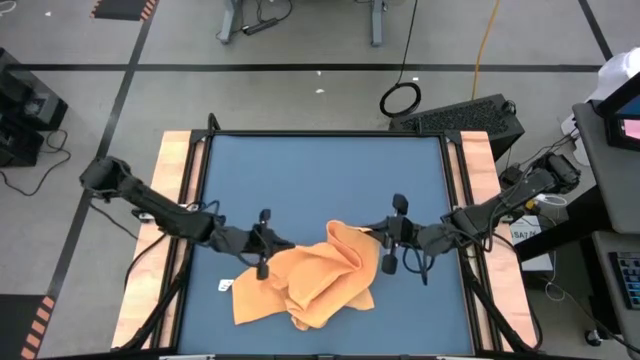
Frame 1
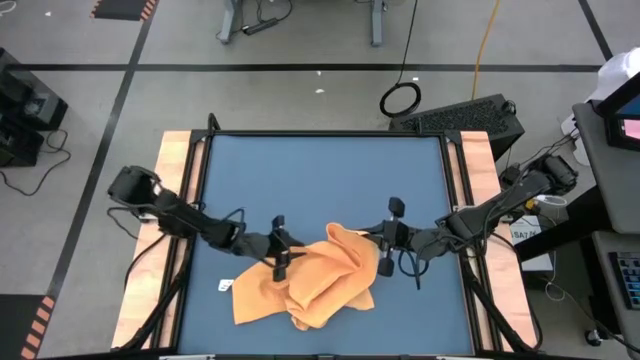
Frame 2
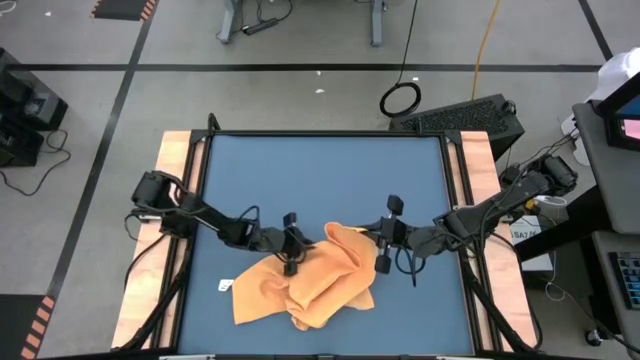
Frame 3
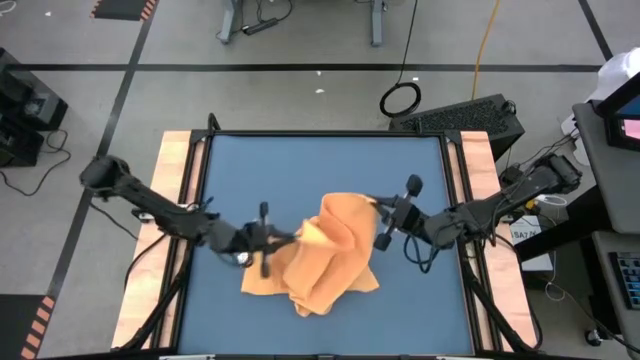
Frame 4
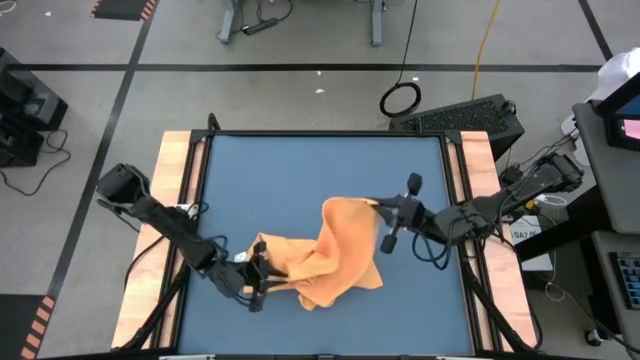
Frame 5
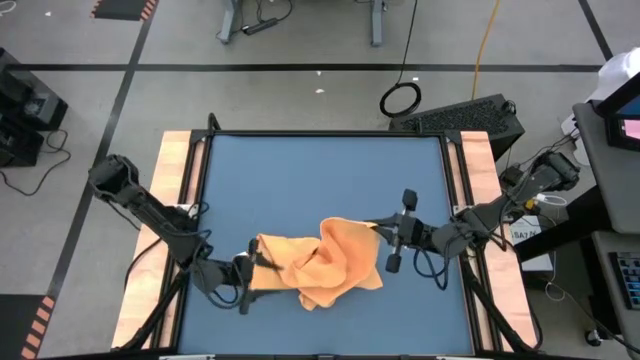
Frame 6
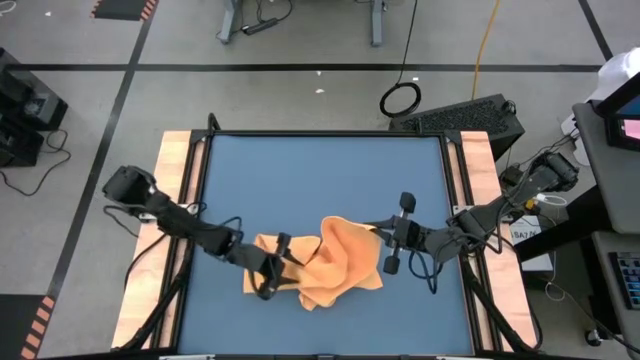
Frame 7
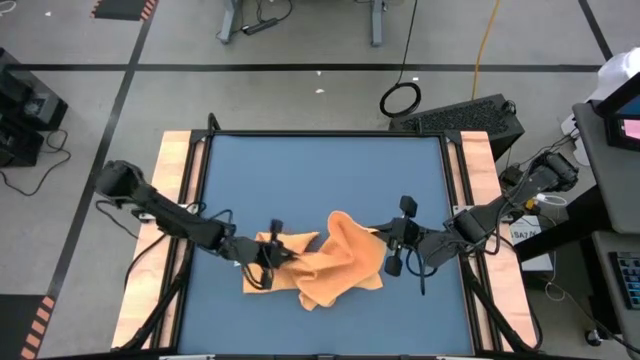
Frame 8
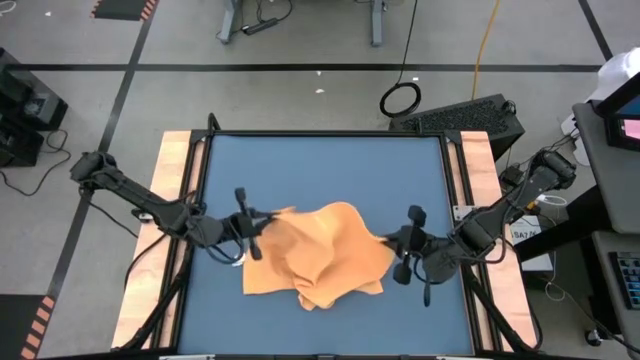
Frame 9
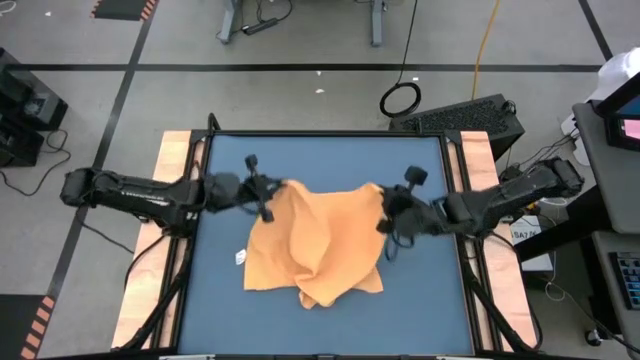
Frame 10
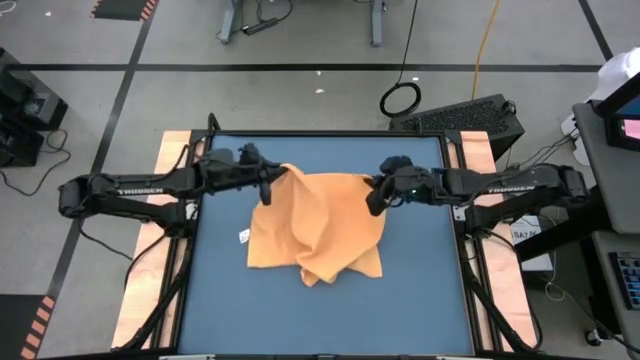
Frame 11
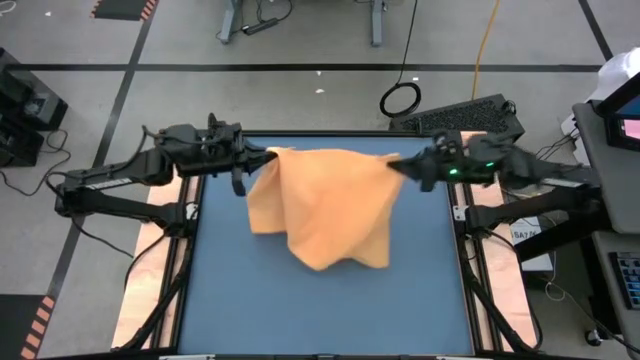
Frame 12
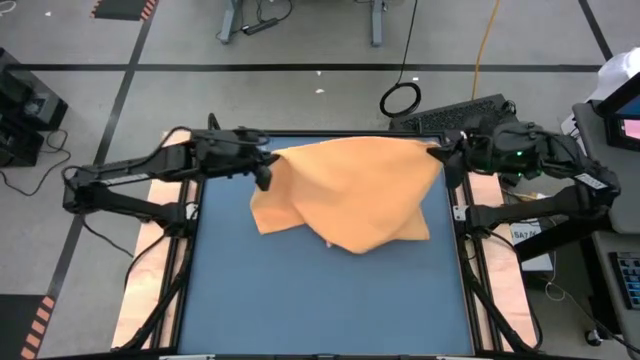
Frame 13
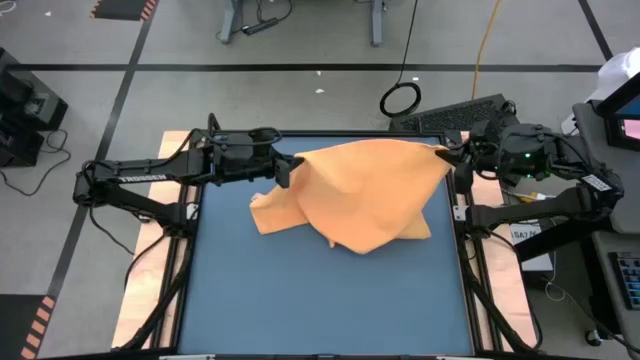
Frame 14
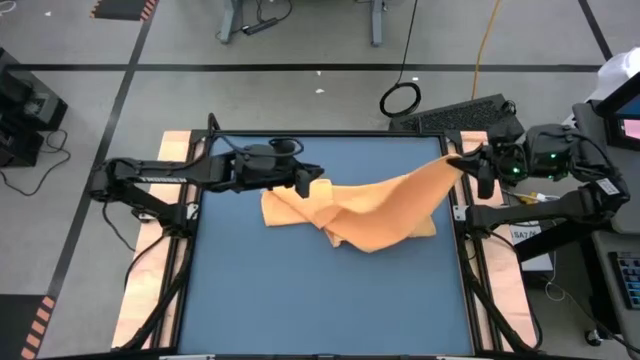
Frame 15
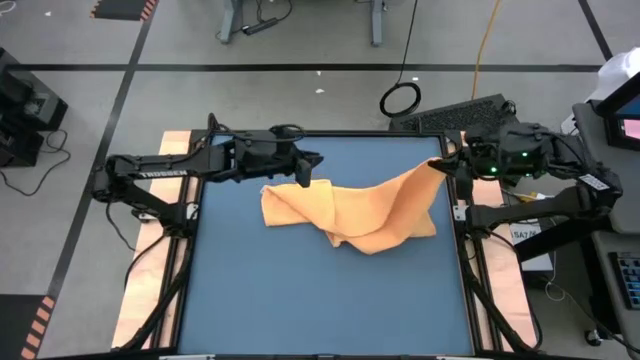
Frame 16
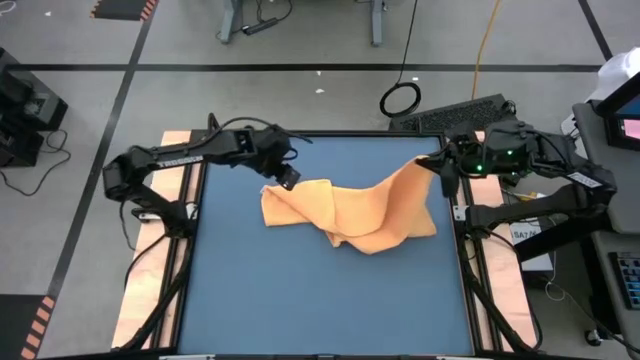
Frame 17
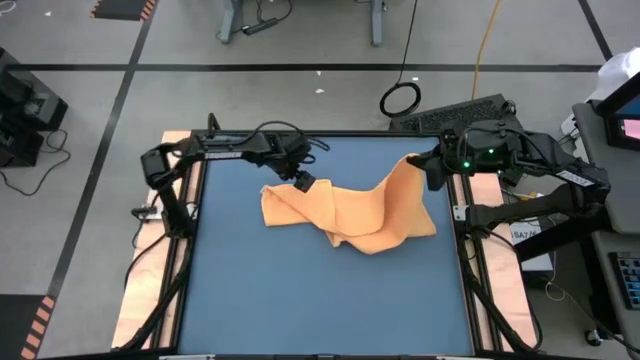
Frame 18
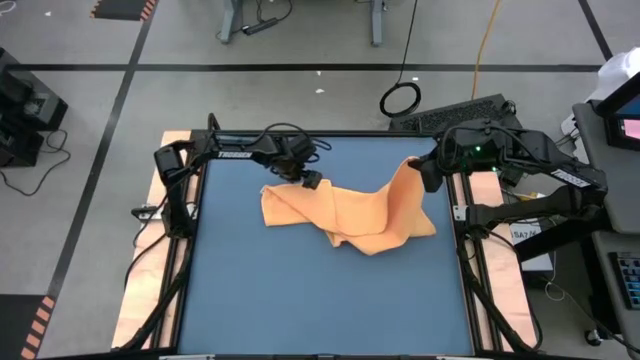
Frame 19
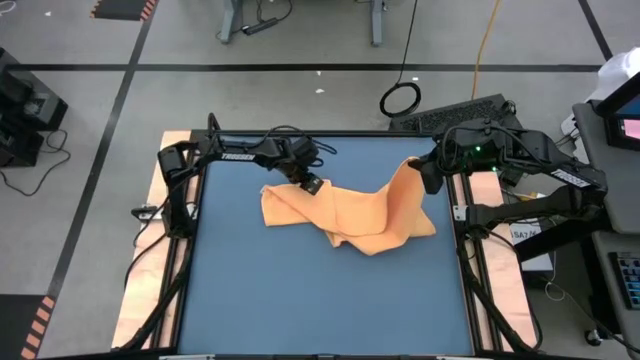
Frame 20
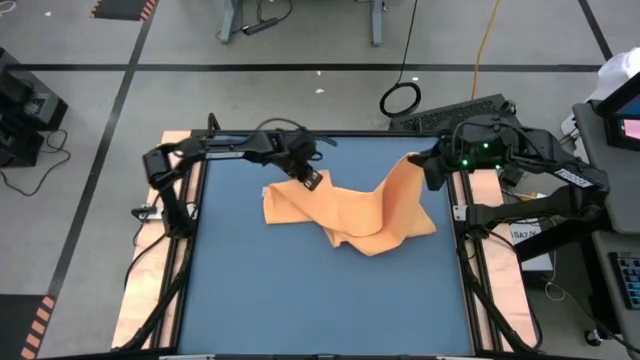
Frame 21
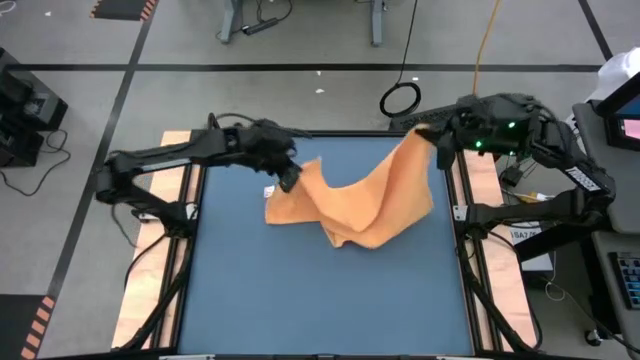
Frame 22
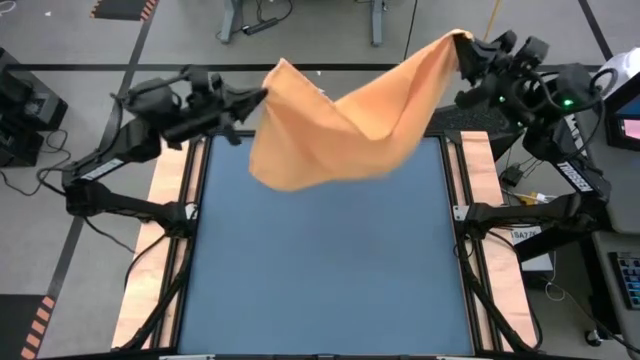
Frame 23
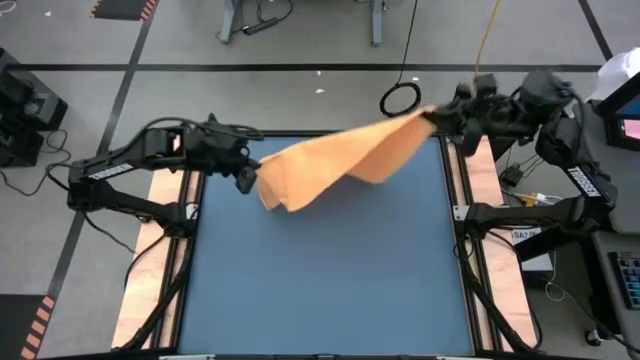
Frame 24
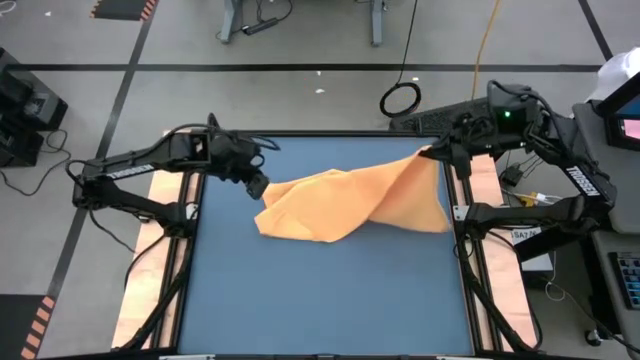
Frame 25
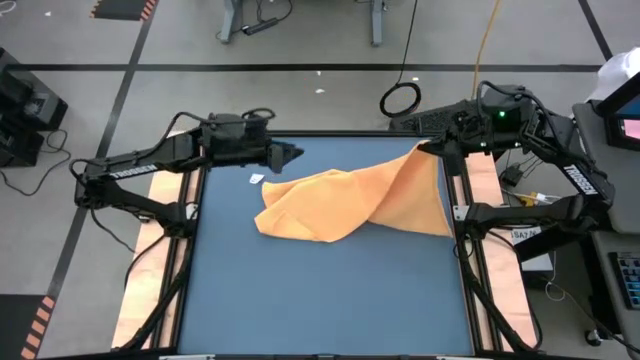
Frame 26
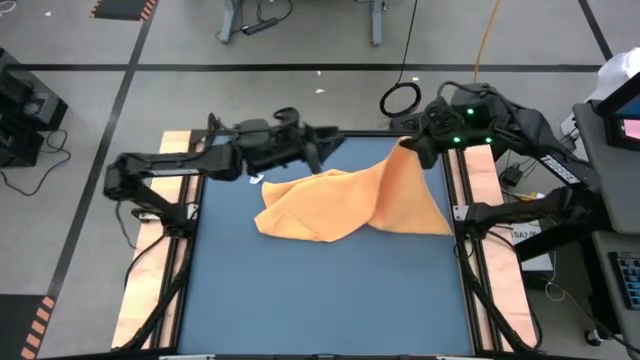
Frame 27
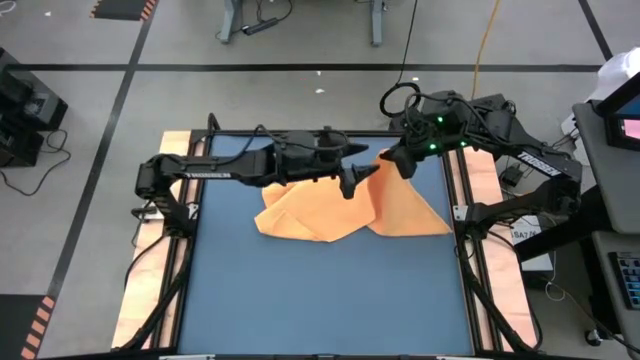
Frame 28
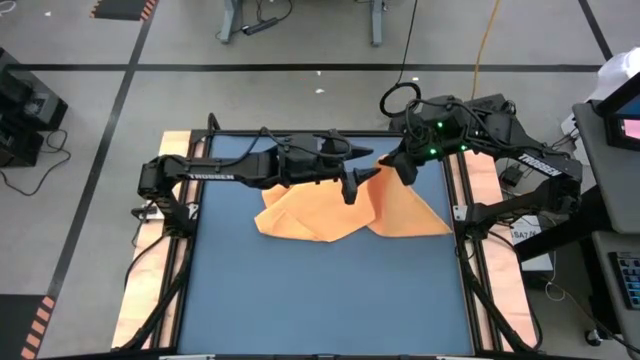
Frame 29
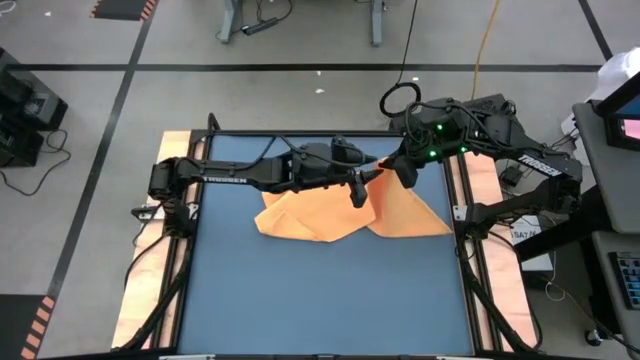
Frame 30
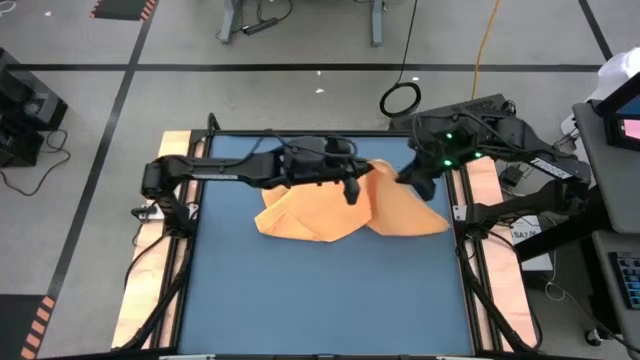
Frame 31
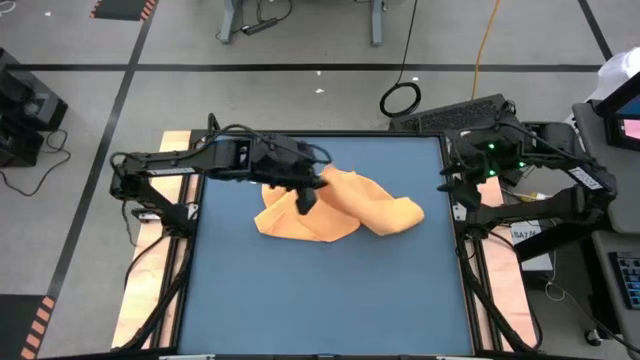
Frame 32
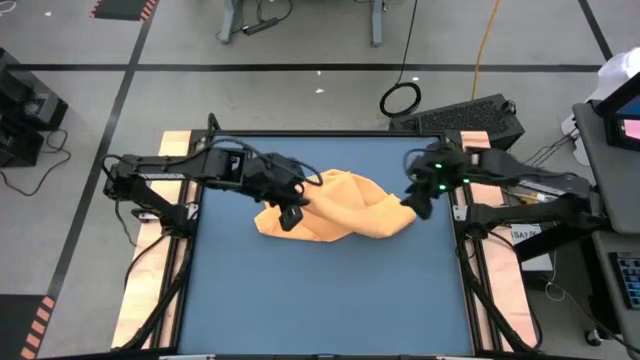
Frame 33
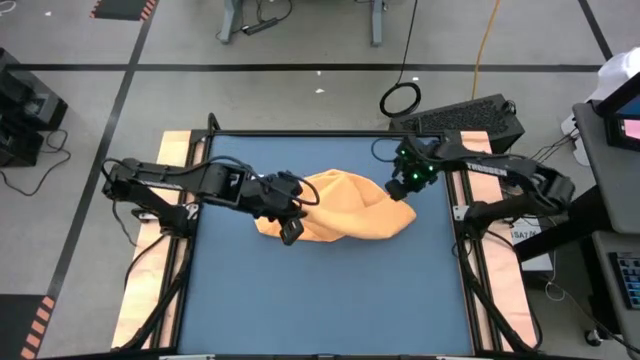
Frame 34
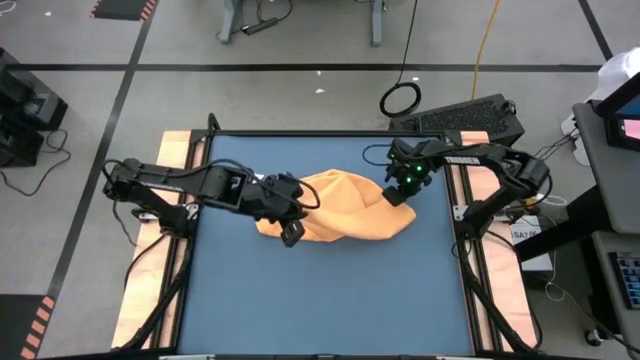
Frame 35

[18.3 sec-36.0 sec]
Task: Roll towel
Roll the yellow towel

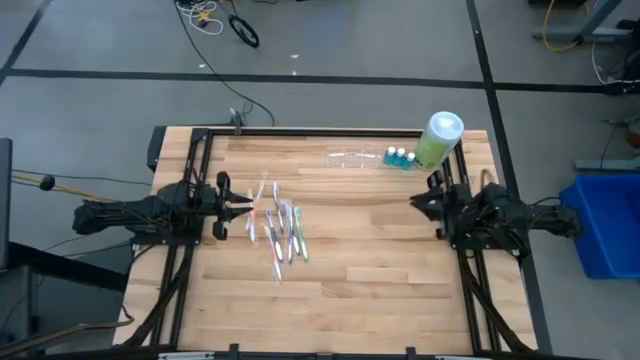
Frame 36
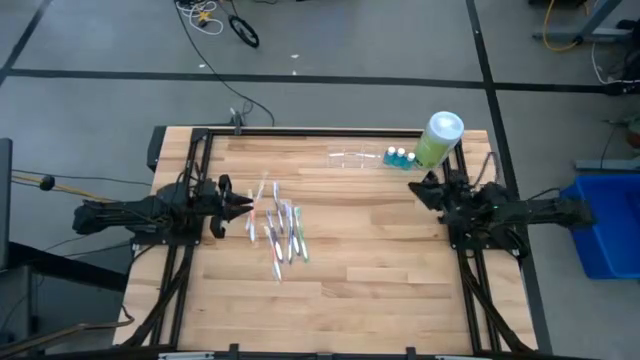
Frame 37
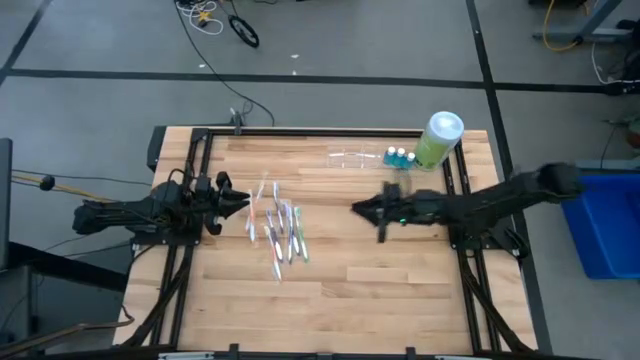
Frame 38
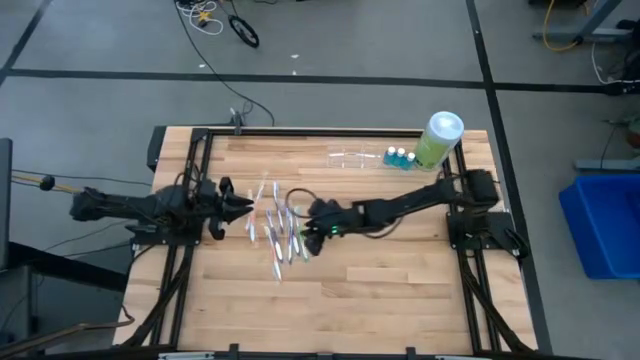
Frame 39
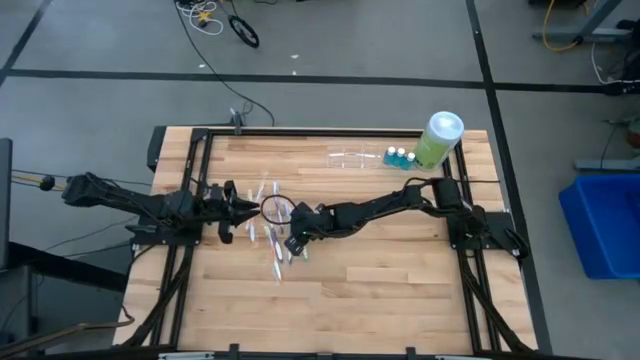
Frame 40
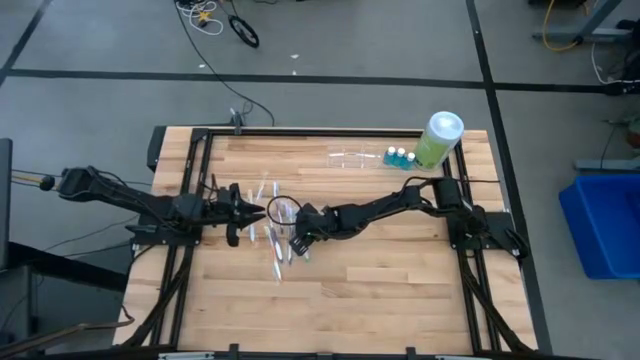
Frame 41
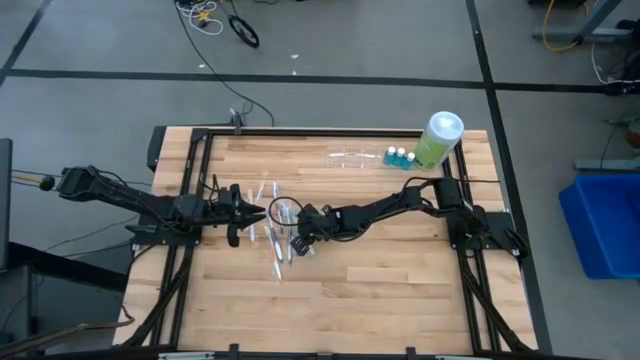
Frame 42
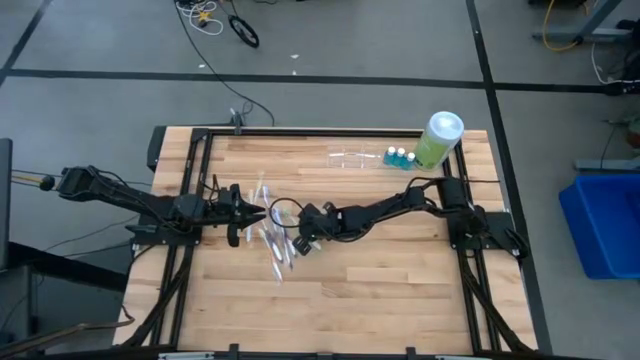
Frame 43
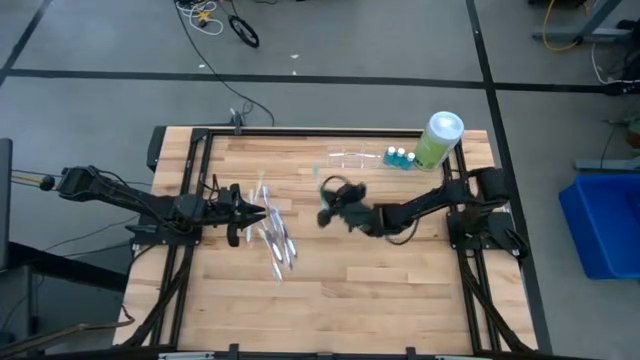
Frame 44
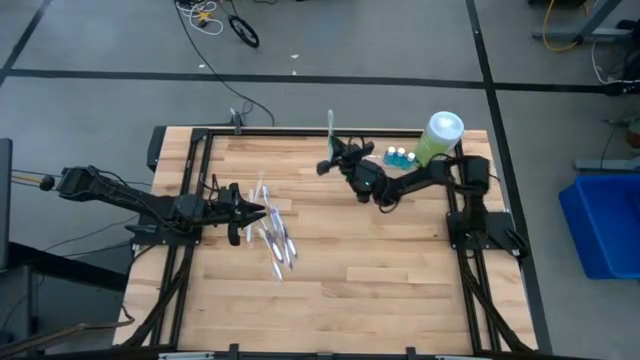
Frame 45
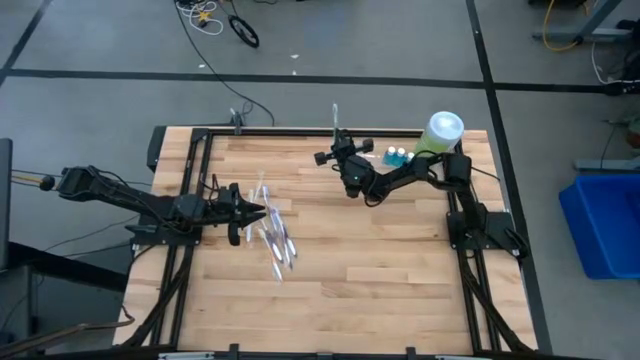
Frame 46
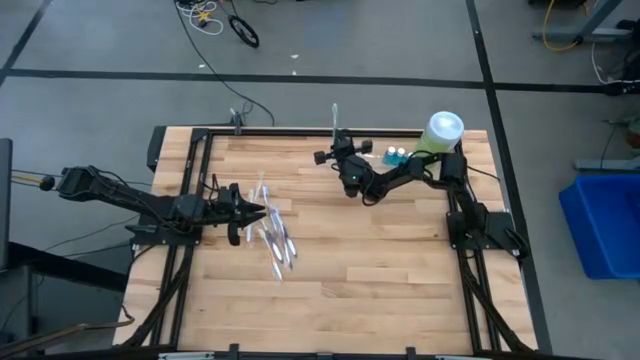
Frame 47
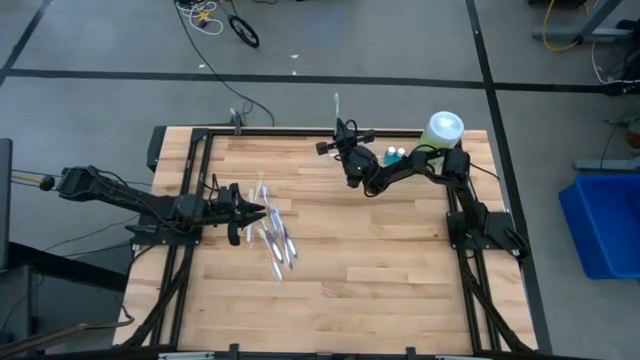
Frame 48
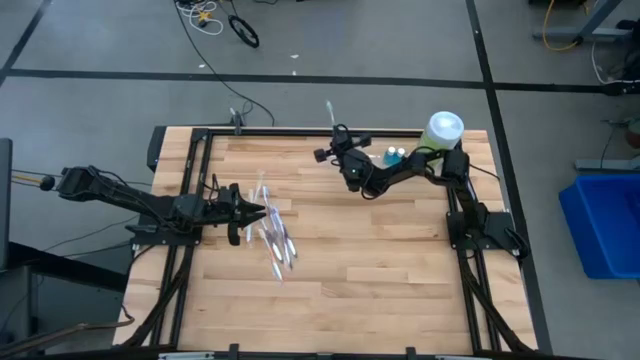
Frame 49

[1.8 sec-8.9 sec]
Task: Pick & Place toothbrushing station
Put the green toothbrush into the left section of the transparent organizer
